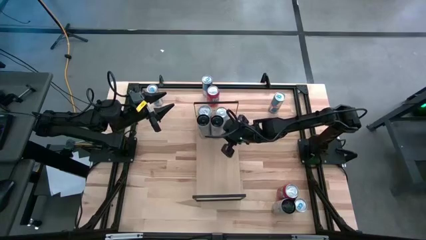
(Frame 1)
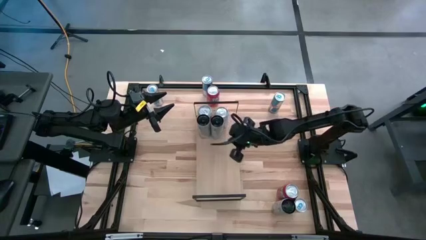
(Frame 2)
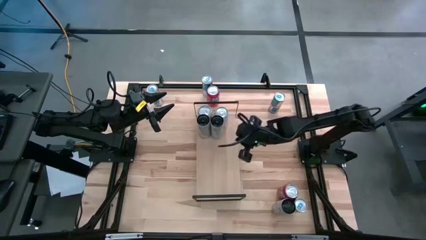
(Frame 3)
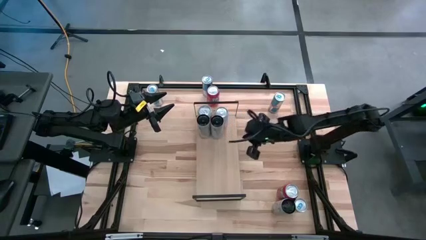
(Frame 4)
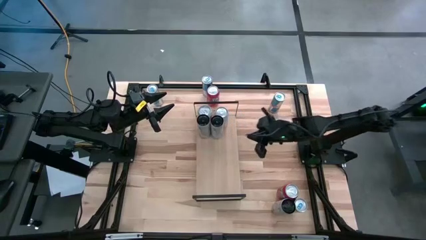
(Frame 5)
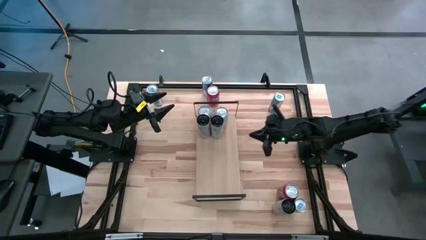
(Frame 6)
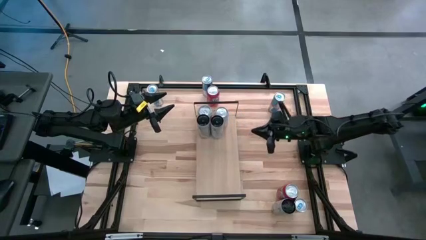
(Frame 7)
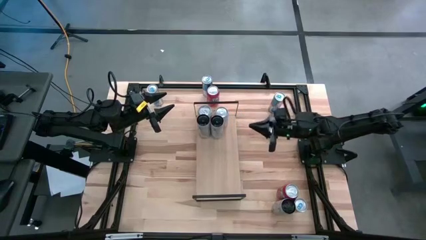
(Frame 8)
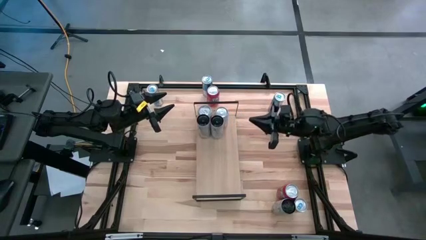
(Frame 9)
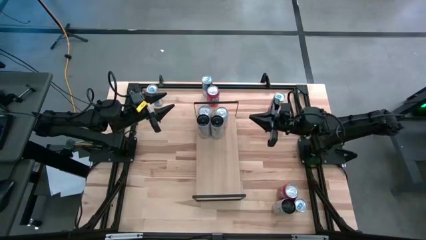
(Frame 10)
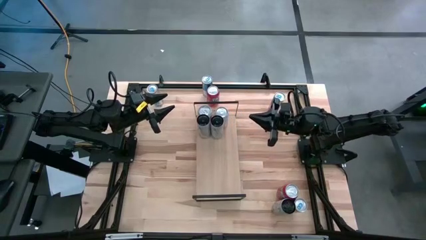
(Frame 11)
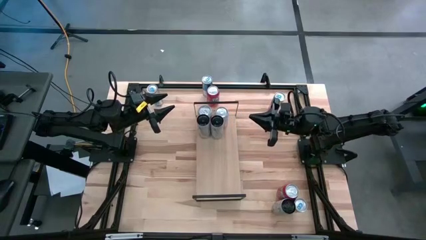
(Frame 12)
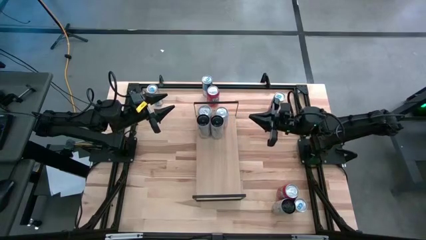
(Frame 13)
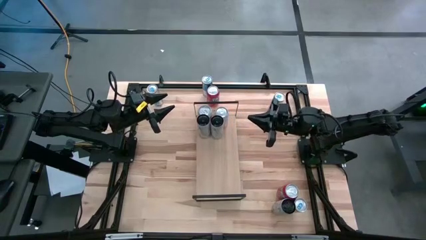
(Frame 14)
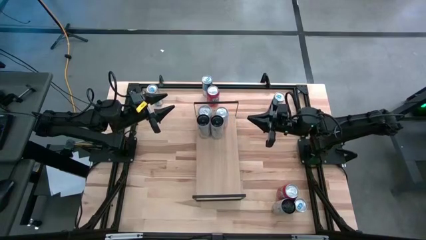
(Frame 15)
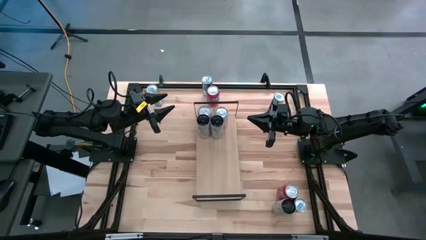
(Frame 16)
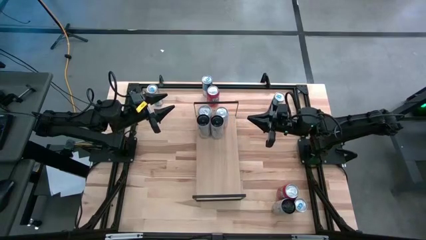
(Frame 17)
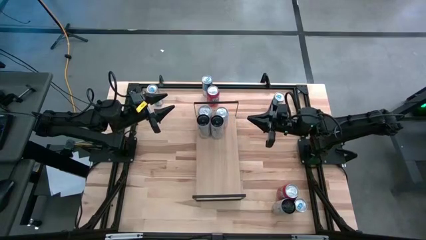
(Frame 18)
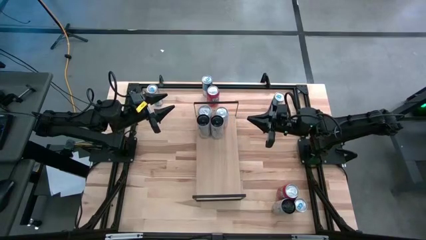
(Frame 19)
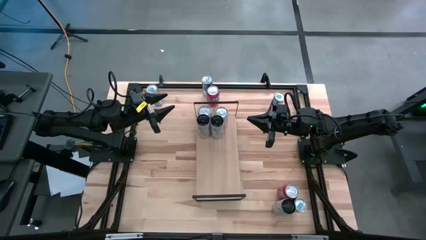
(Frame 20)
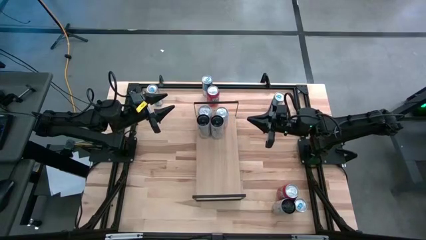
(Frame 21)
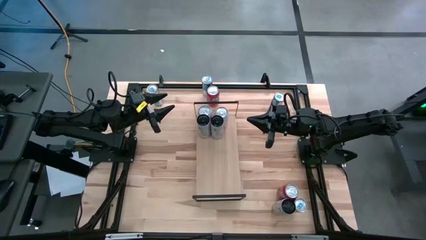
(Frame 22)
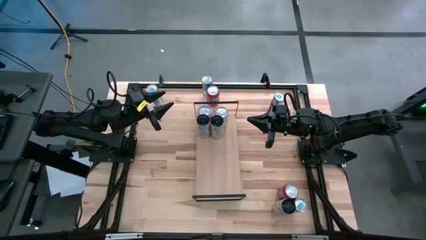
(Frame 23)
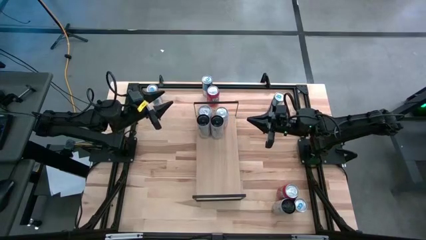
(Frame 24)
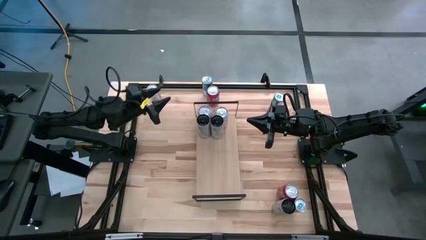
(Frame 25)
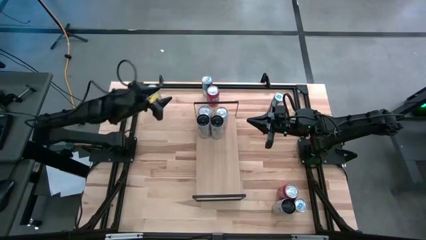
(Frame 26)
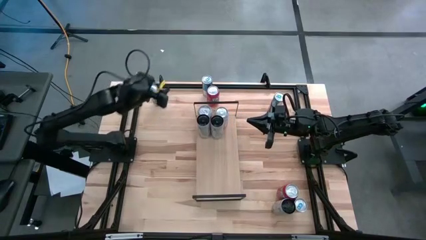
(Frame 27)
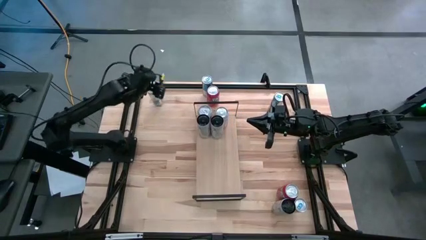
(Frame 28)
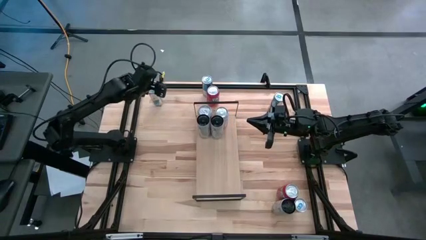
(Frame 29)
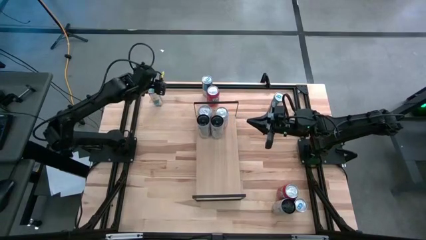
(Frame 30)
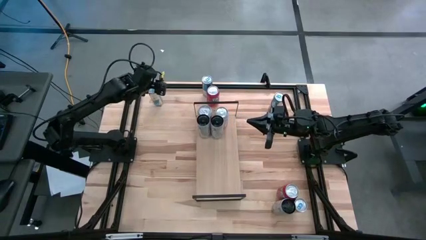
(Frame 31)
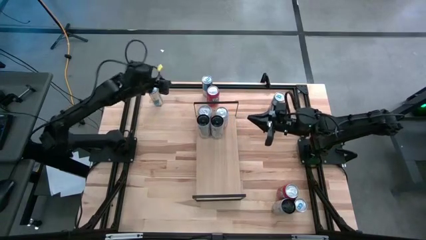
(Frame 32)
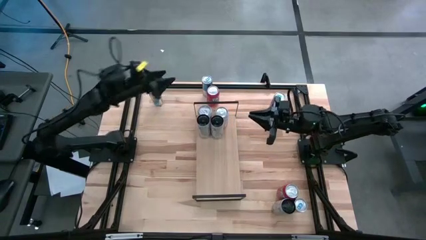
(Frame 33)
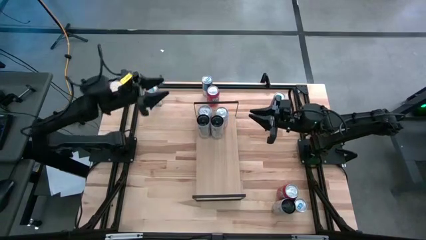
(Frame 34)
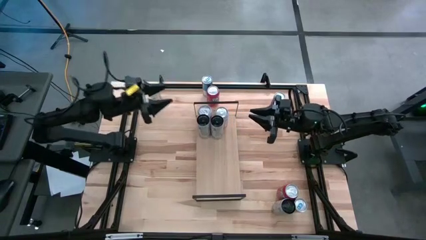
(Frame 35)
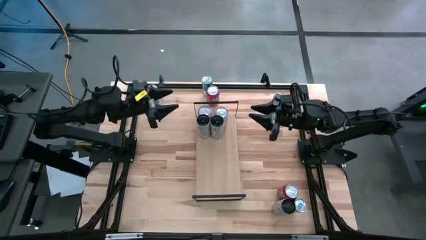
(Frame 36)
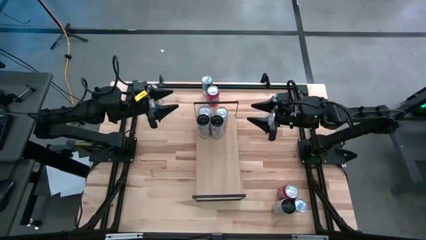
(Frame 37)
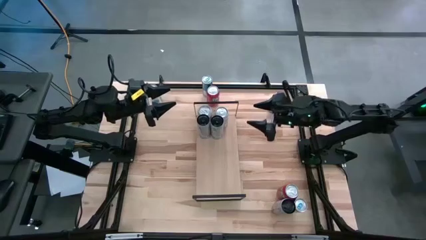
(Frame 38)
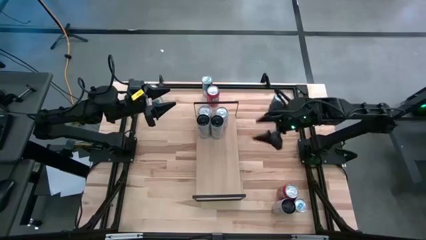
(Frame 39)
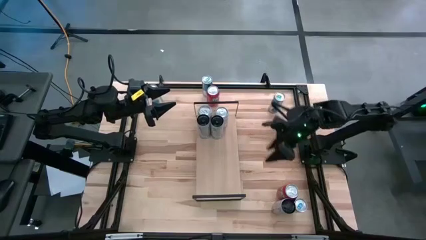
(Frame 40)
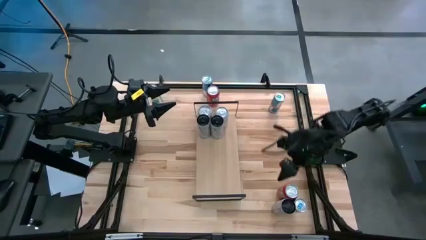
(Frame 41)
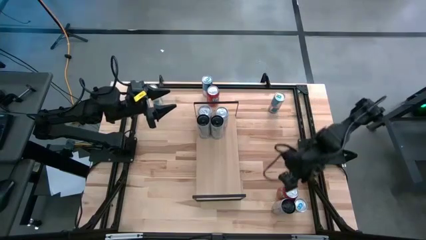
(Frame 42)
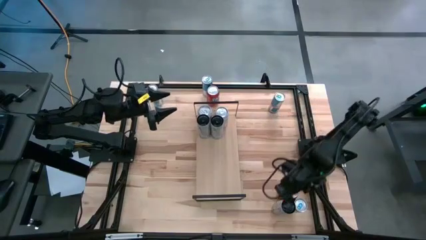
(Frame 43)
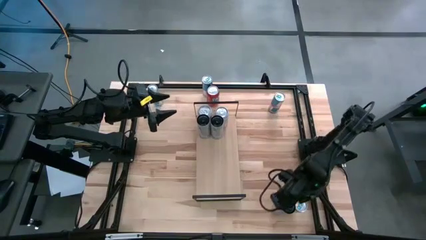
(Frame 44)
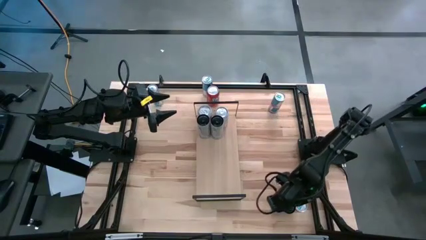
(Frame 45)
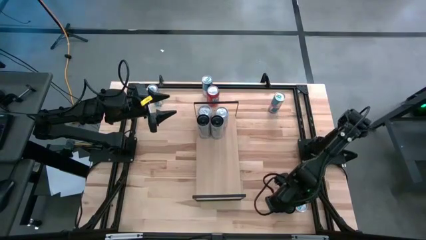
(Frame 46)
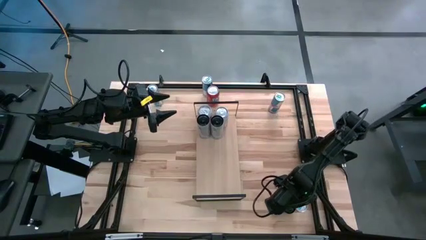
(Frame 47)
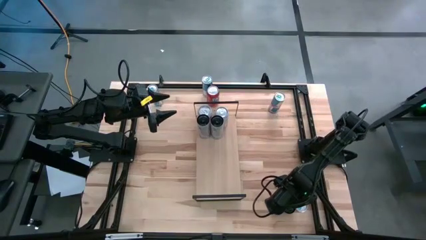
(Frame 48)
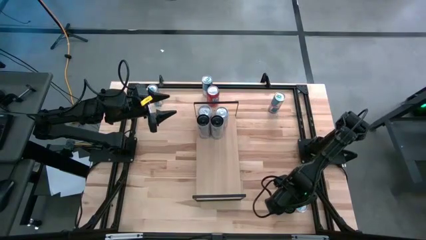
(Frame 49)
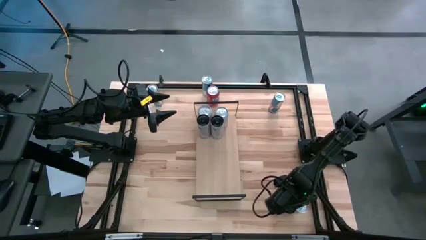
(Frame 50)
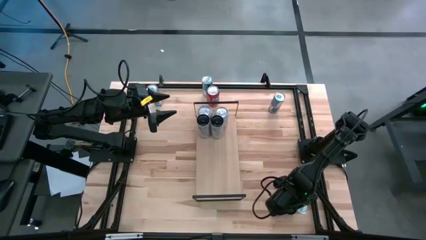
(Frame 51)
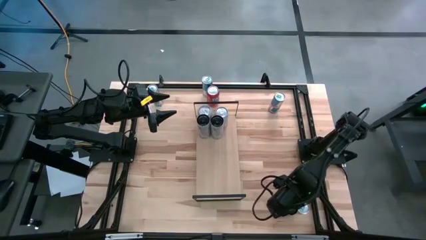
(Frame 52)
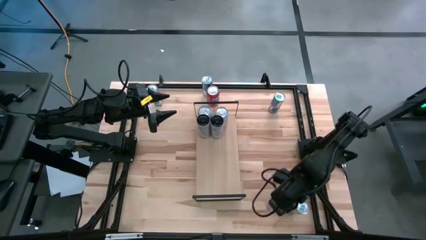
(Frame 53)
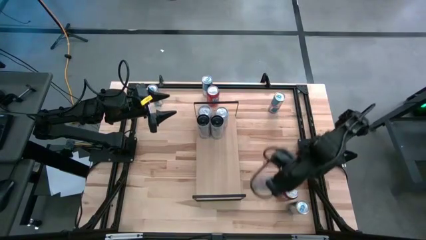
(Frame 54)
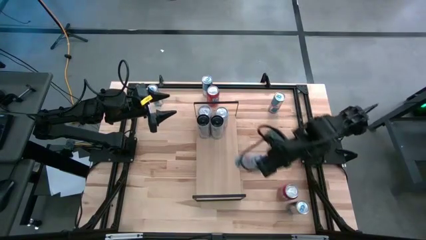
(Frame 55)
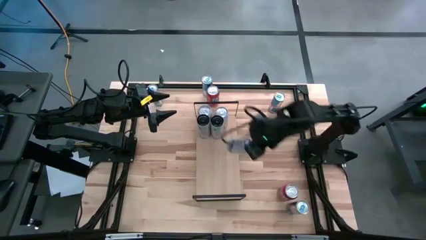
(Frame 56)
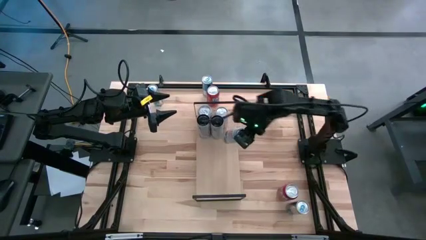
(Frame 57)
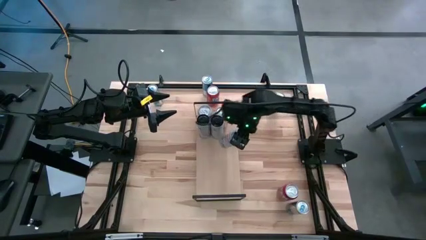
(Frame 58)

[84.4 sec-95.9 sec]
Task: Place canned beverage on shelf
Put the white pink soda can on the shelf

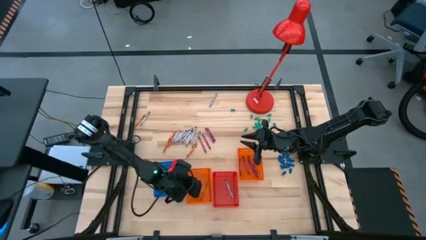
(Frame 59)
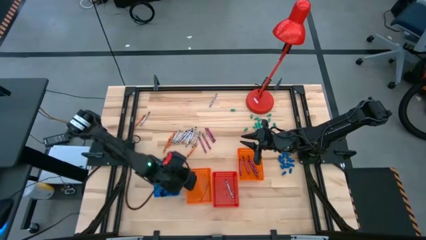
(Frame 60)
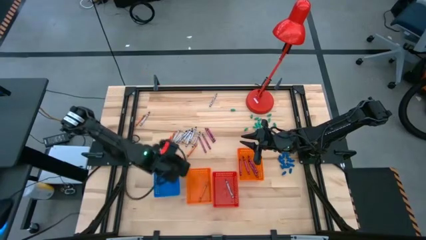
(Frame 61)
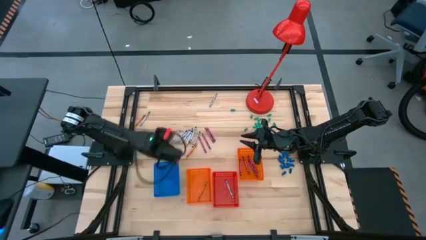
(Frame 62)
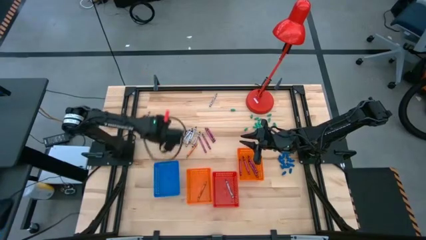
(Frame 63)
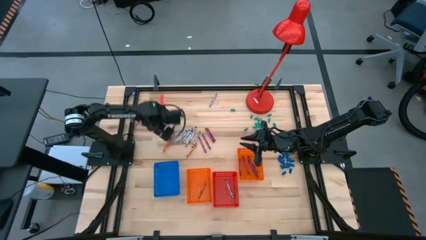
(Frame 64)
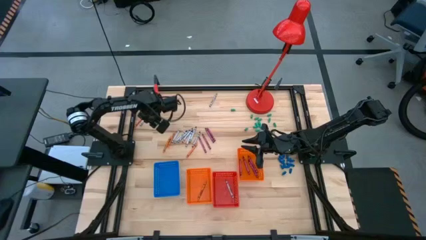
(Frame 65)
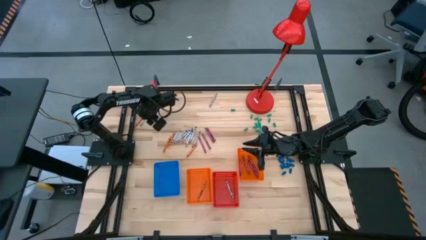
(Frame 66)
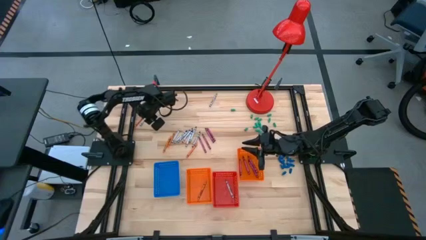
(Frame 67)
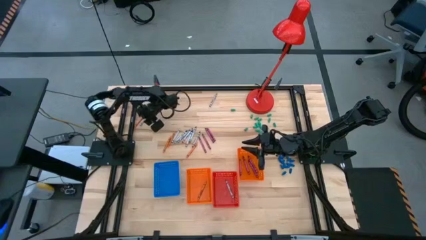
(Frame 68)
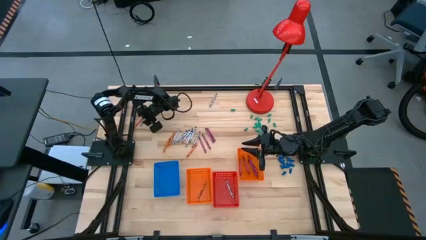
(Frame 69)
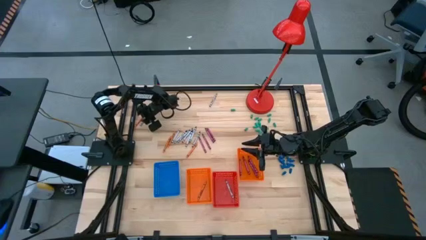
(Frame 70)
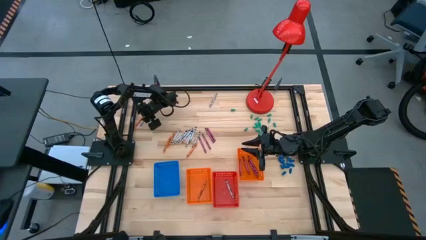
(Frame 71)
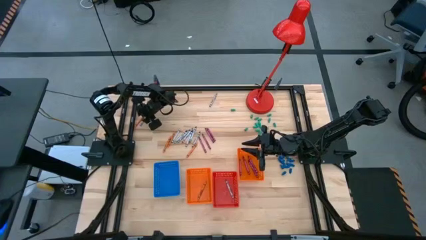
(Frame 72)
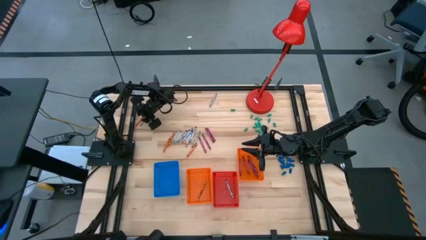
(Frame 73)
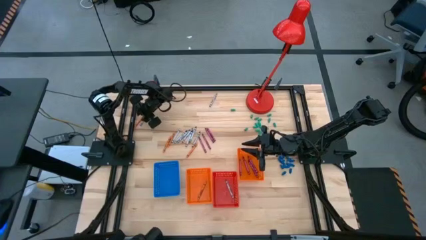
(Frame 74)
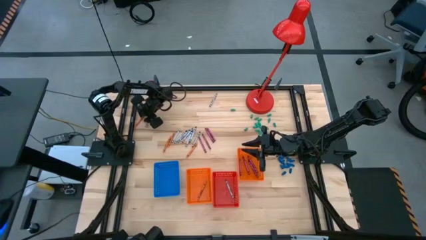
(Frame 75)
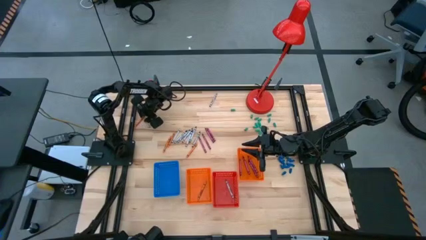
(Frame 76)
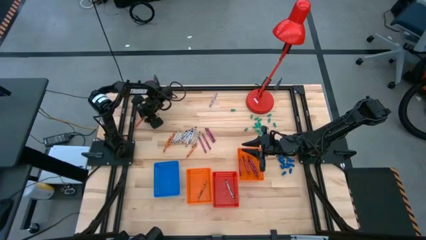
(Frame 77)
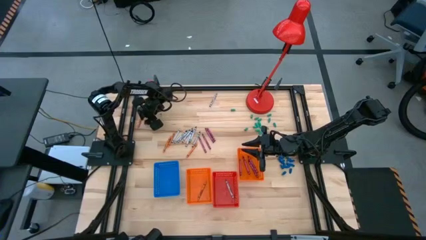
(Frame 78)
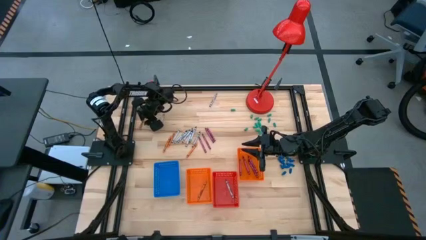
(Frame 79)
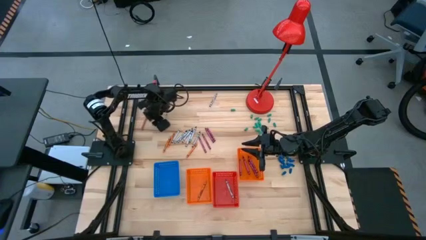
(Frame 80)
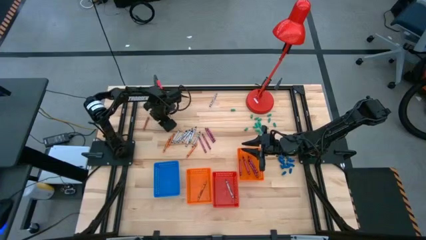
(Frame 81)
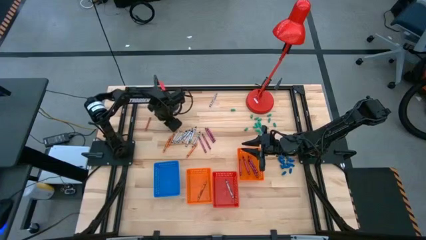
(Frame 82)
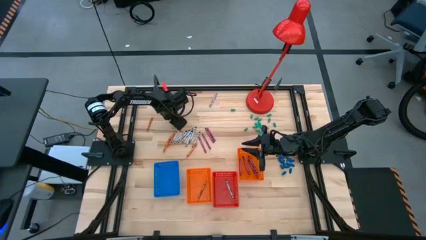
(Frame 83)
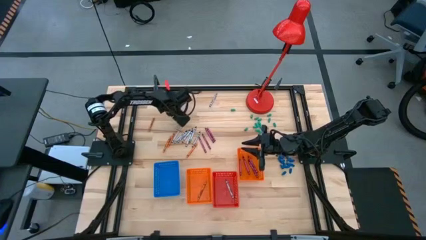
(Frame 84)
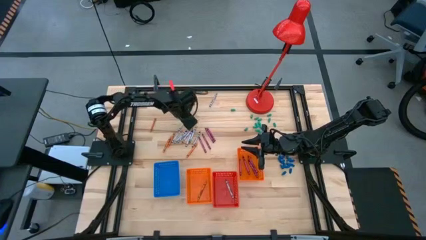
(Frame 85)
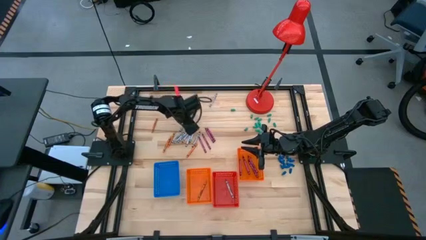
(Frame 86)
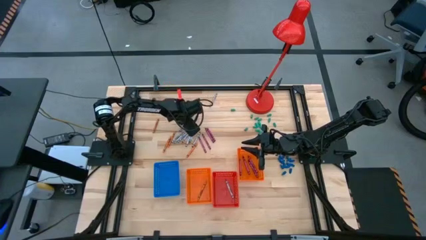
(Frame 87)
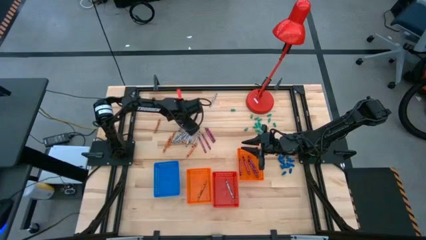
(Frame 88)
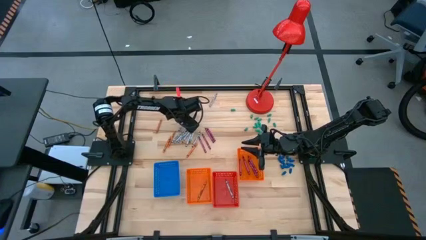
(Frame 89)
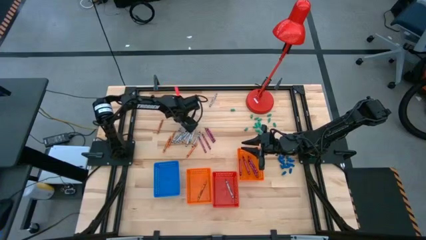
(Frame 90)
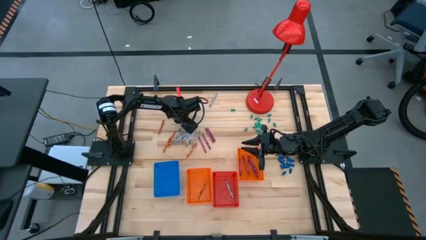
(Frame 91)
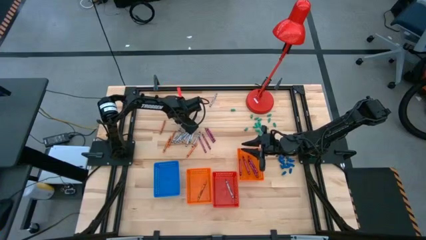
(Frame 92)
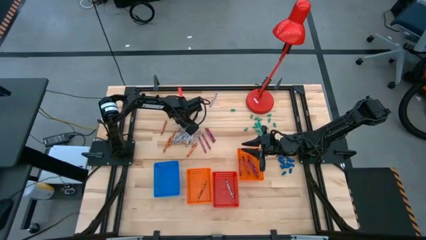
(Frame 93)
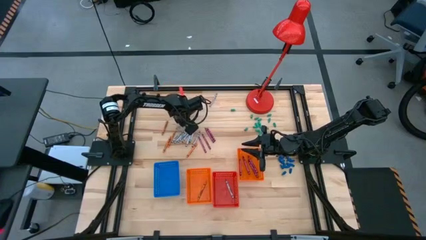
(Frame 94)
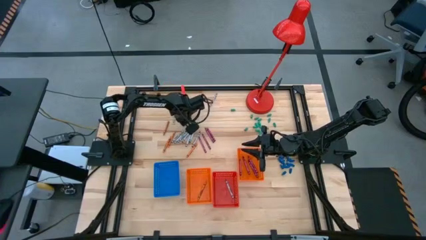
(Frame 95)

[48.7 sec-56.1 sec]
Task: Sort crayons
Put the black crayon into the blue bin
